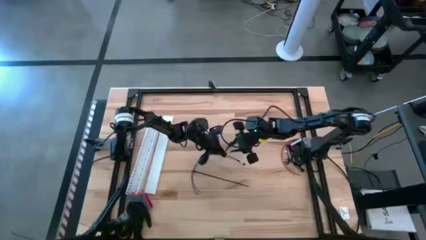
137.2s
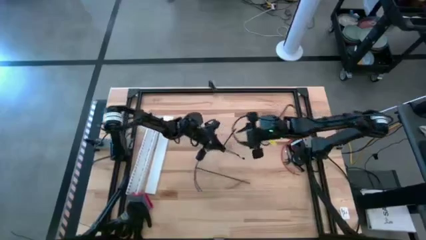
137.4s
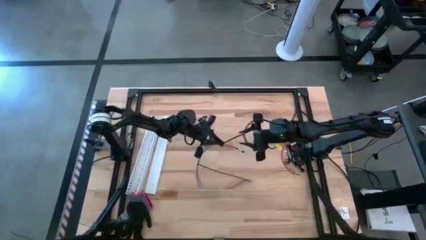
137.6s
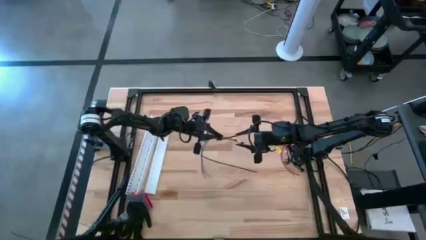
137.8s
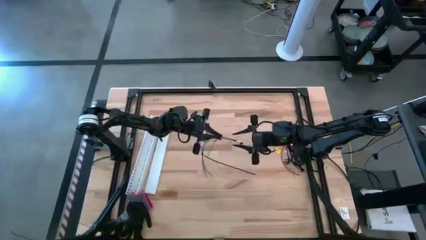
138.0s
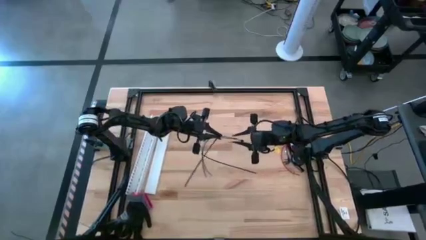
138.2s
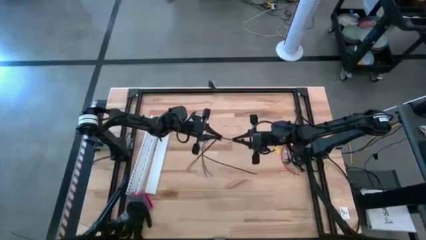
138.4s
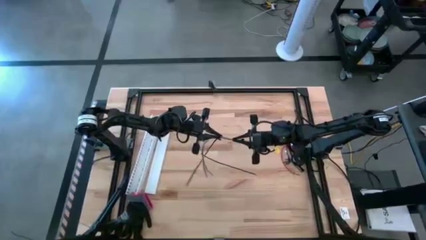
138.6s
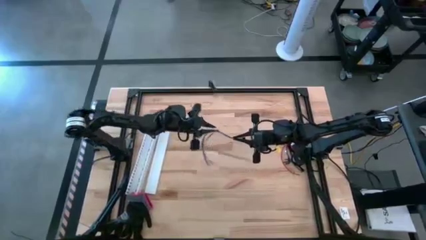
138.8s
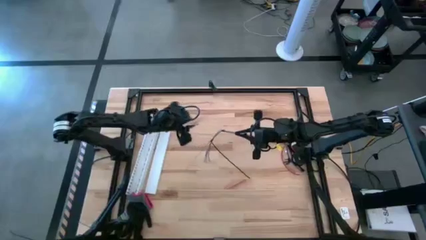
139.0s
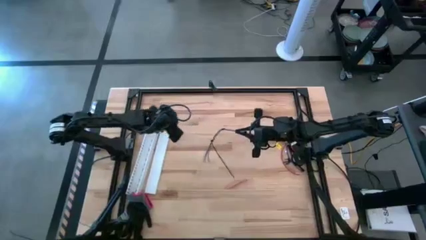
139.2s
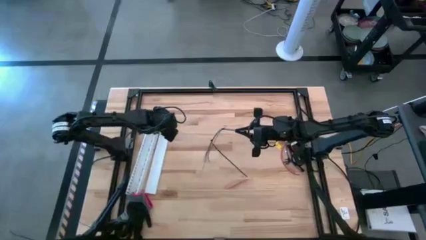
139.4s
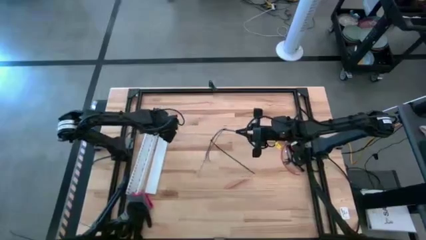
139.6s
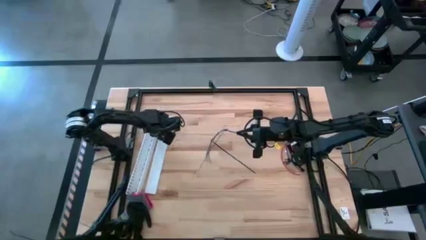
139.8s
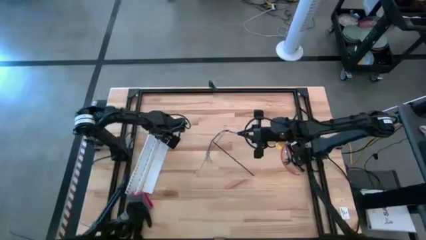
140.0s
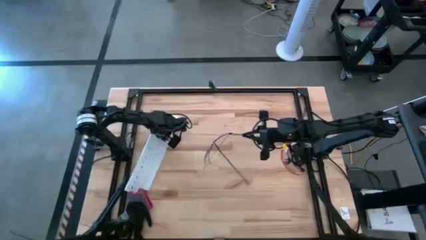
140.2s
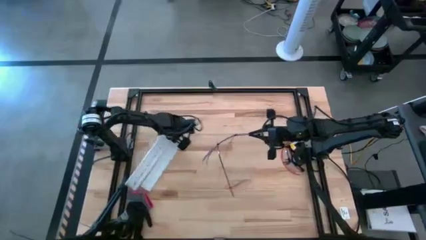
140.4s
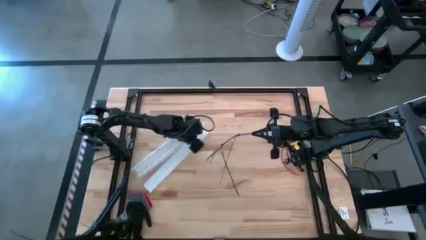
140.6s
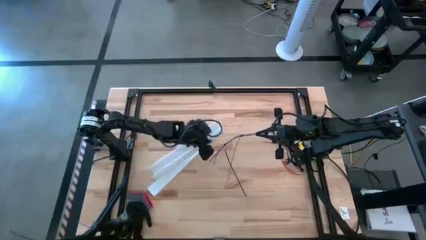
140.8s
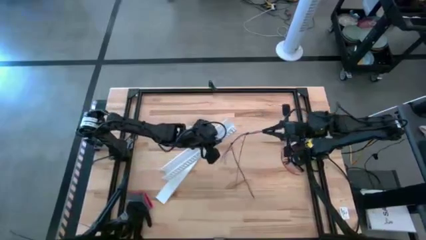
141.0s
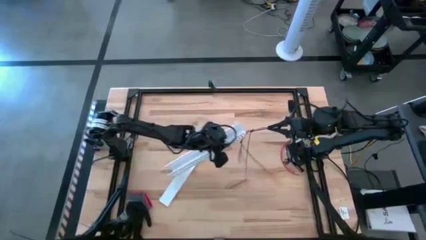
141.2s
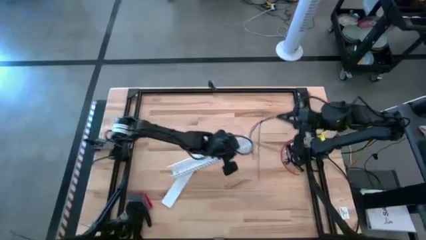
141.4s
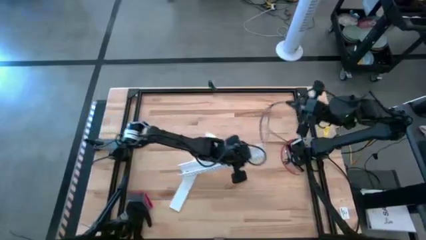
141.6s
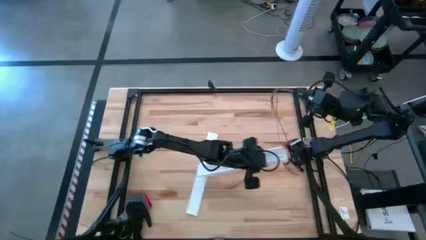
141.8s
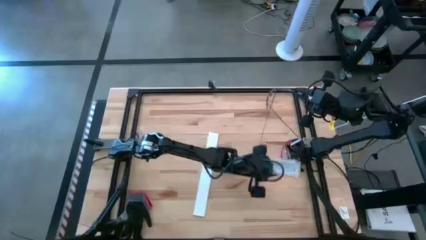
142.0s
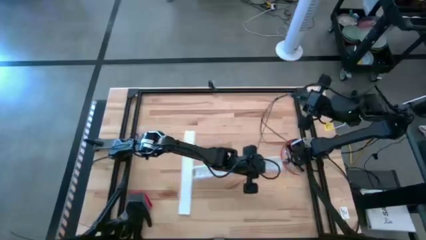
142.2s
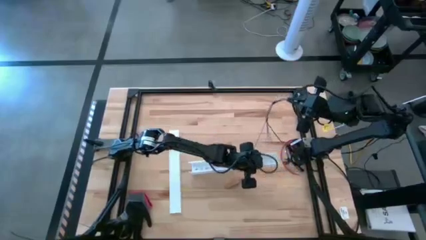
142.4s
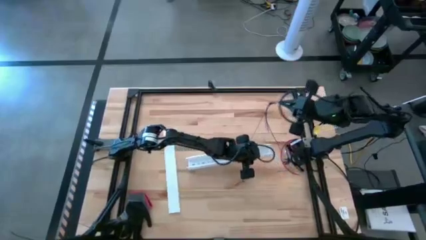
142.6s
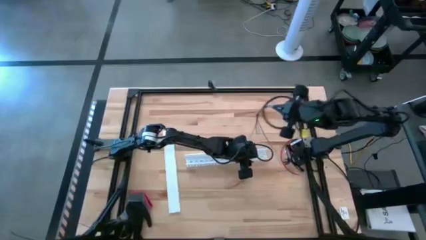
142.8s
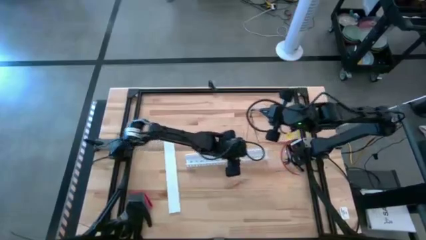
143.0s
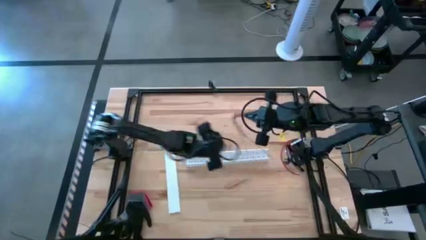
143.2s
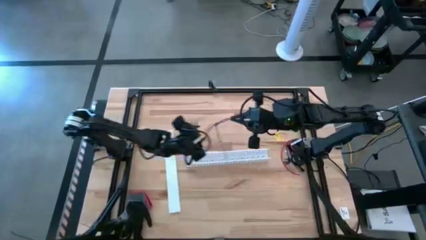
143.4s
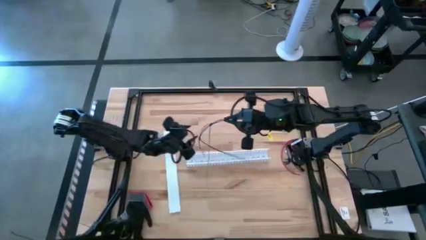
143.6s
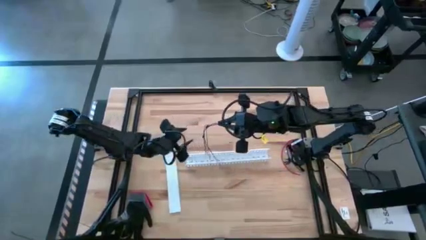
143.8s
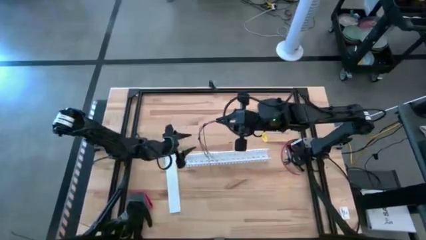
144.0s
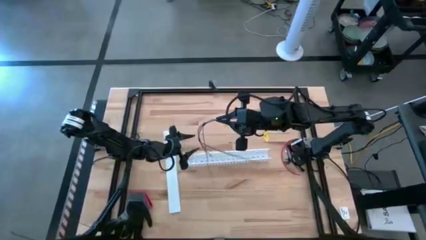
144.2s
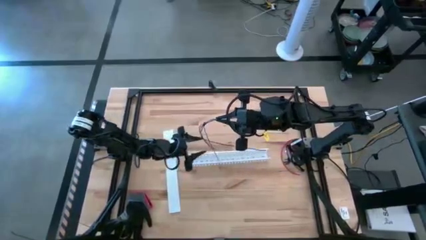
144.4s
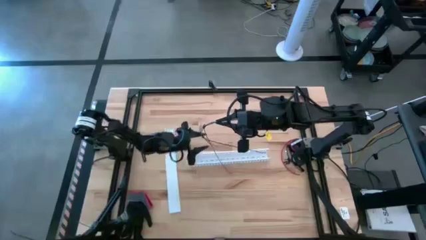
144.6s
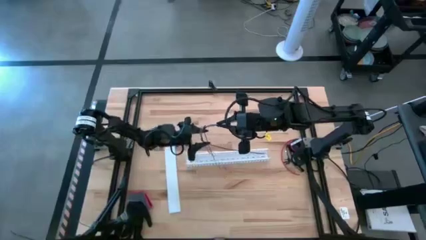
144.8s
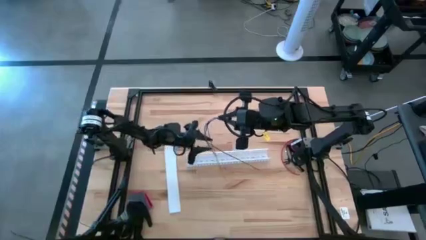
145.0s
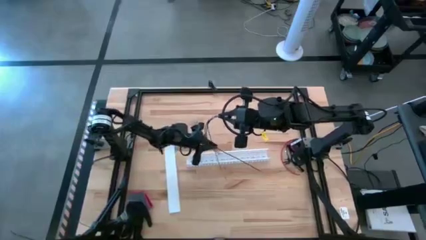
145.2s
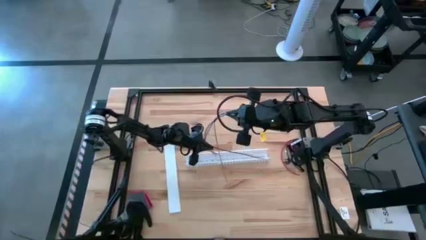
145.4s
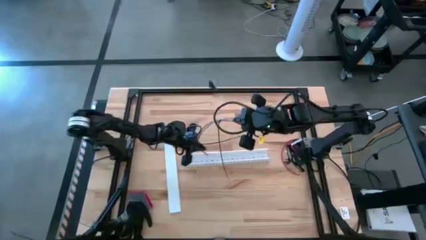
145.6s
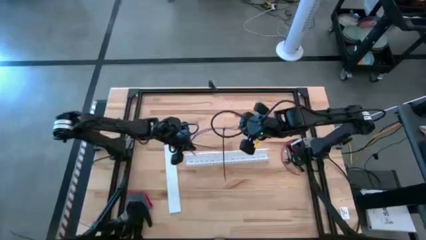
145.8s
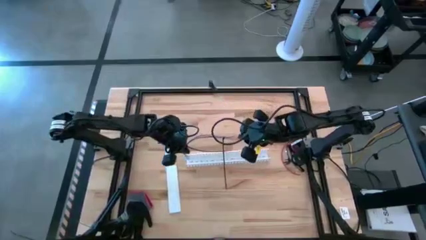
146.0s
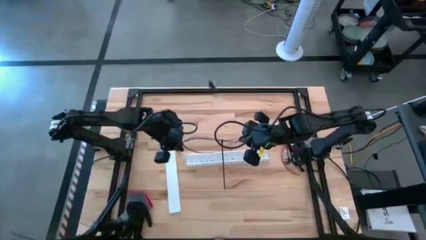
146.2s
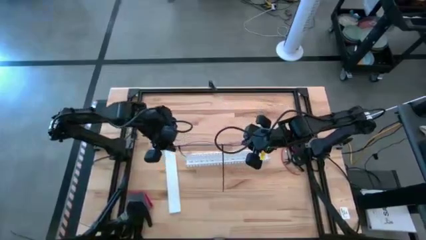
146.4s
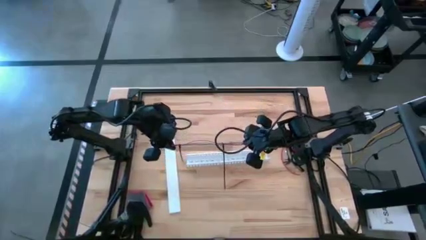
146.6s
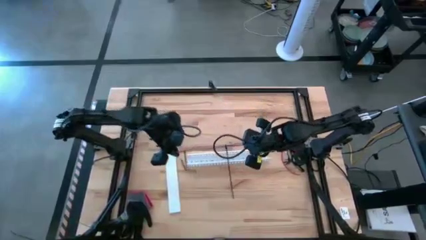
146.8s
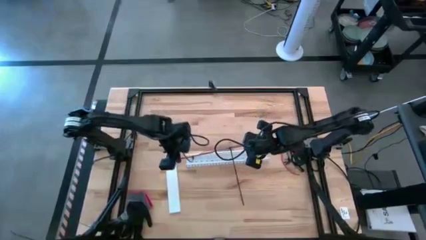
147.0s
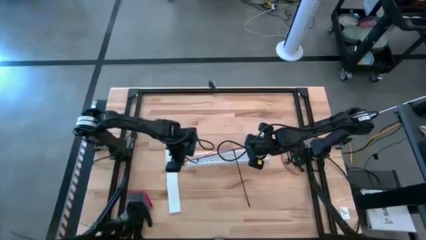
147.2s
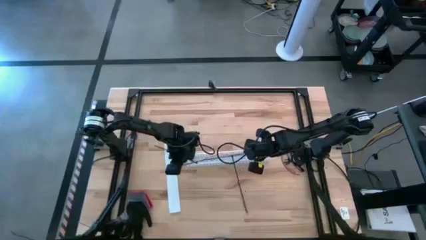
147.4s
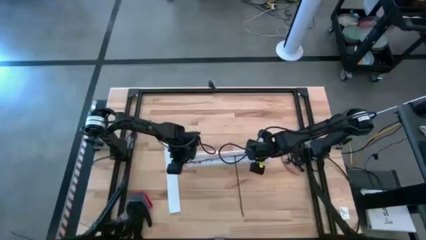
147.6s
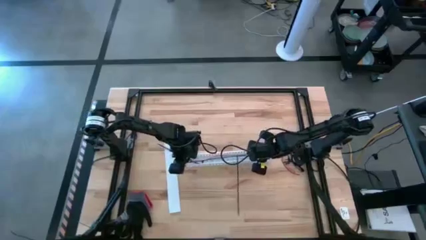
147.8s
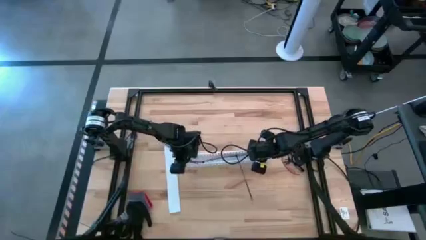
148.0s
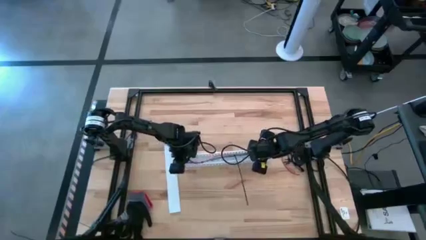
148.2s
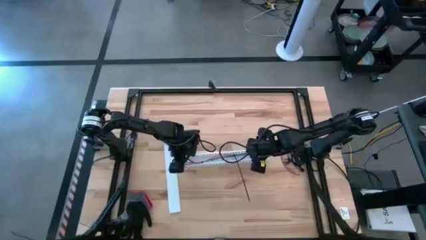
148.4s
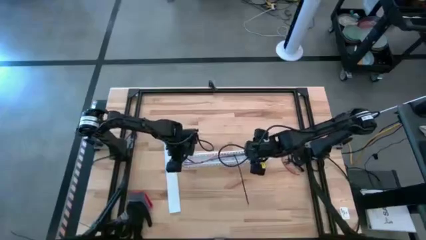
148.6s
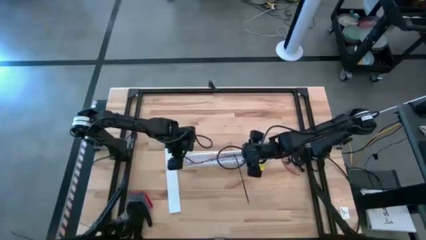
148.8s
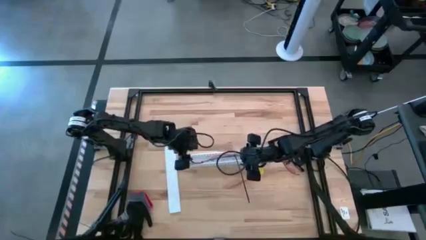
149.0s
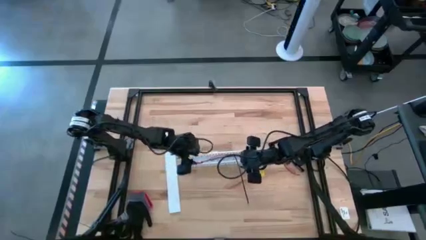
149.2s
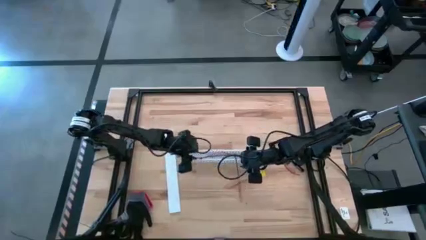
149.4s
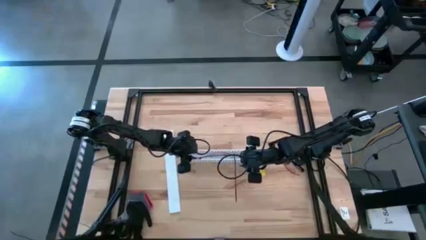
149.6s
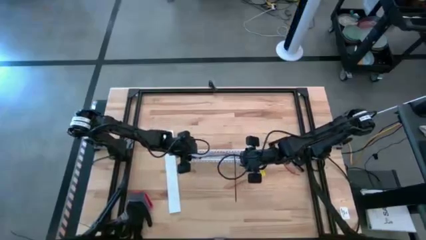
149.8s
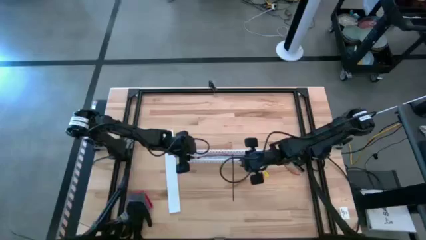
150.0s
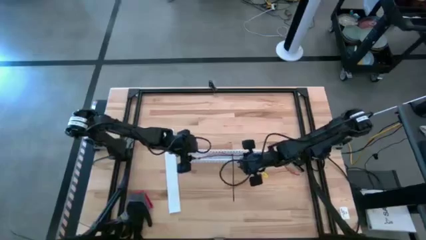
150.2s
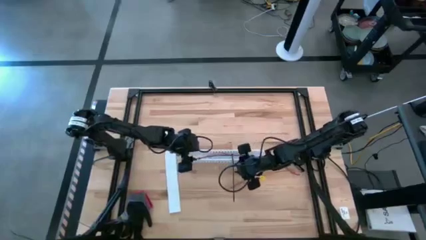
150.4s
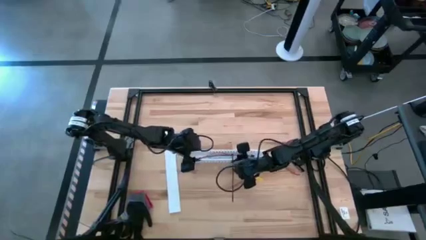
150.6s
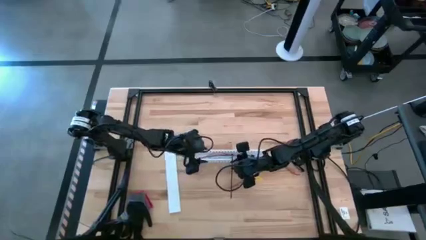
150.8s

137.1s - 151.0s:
Task: Ziptie cables
Put the ziptied cable wires into the white cable duct

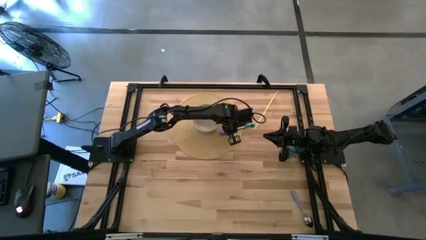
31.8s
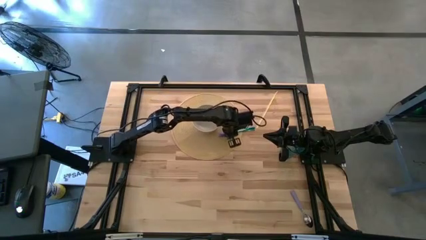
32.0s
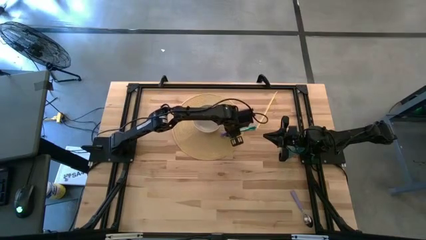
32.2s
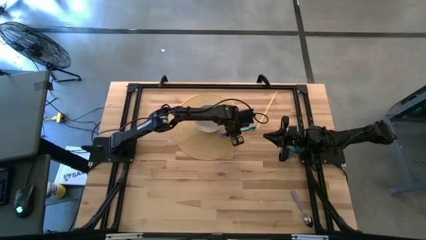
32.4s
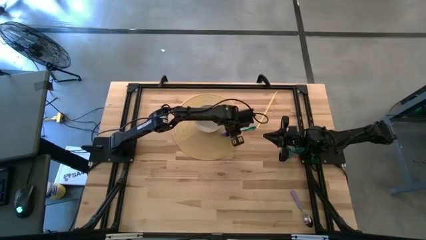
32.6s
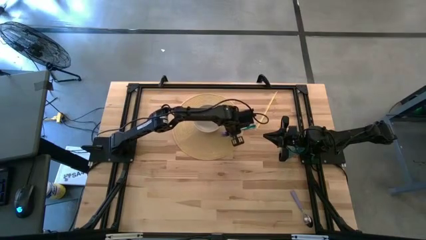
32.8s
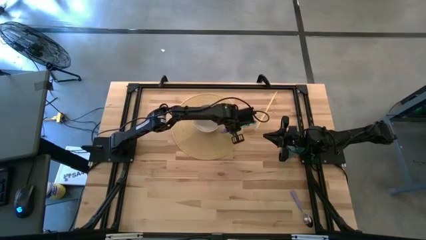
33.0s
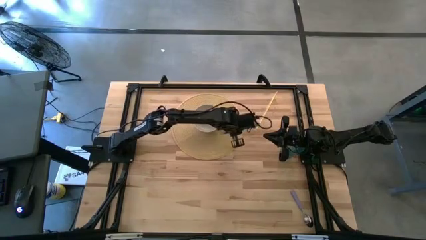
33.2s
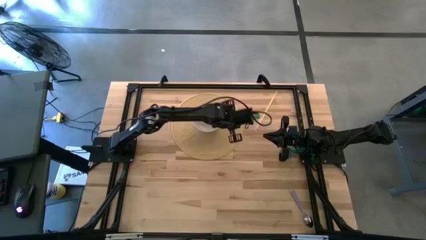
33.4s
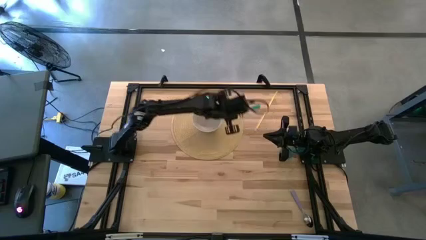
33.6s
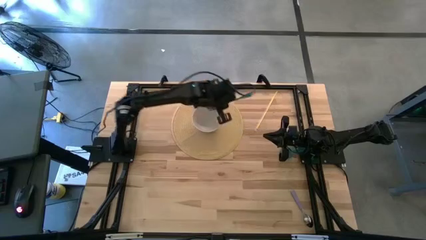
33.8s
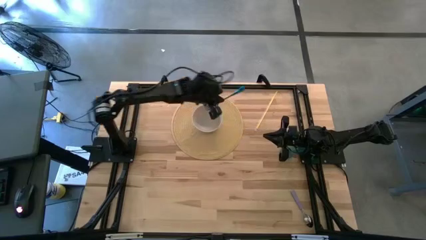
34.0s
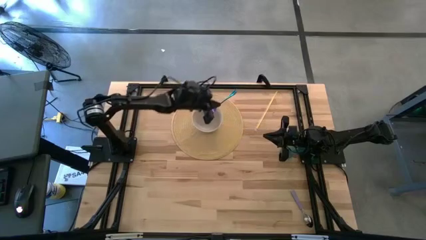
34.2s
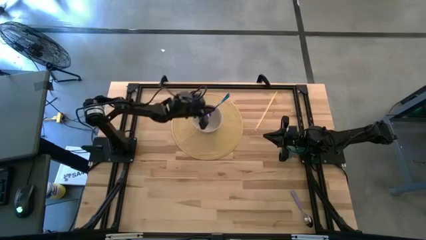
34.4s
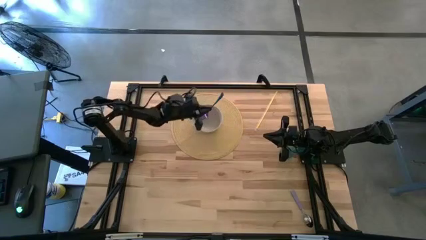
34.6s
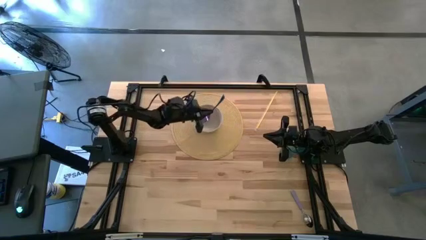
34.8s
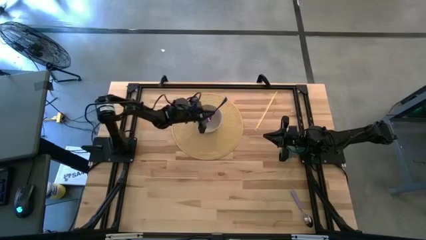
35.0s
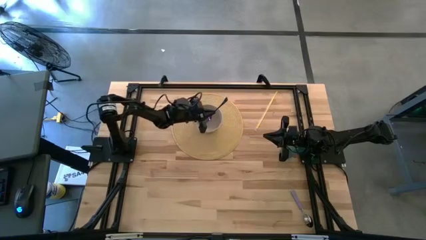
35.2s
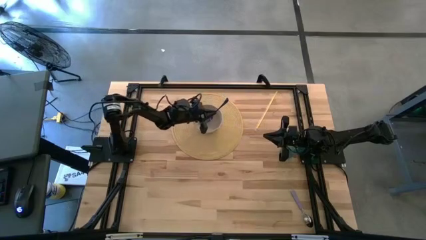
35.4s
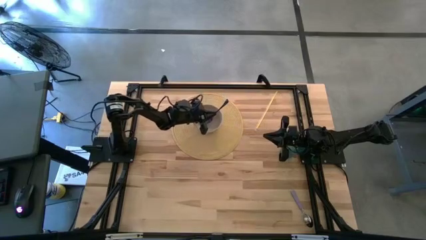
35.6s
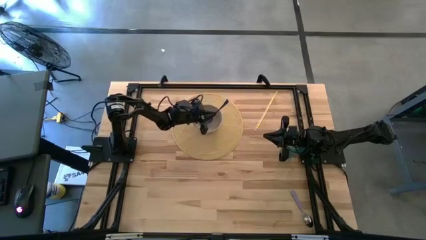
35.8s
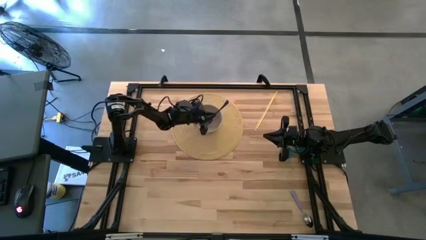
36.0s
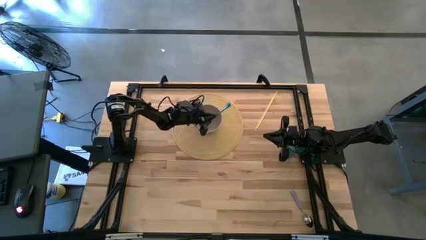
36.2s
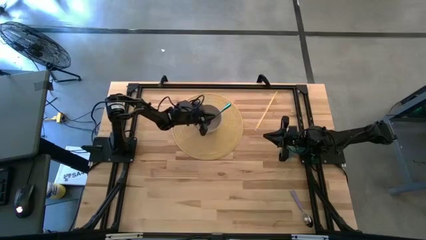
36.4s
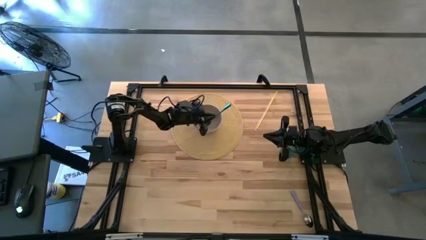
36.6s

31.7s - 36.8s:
Task: Pick & Place Utensil
Put the blue fork into the white bowl
